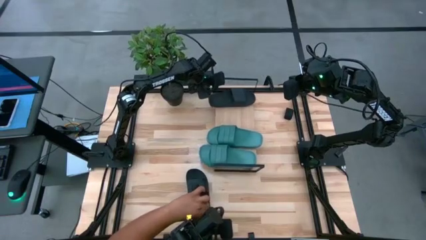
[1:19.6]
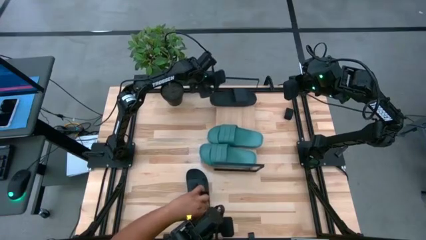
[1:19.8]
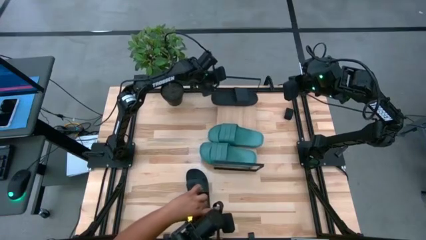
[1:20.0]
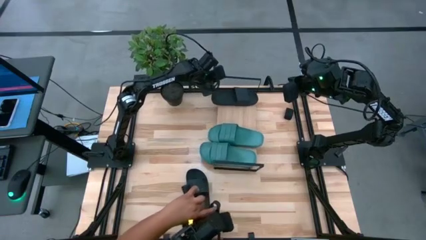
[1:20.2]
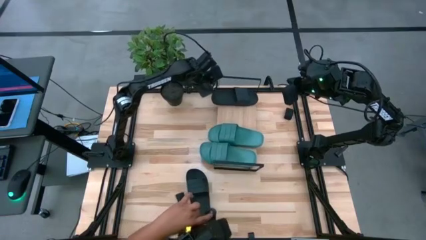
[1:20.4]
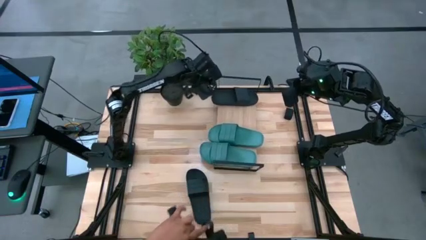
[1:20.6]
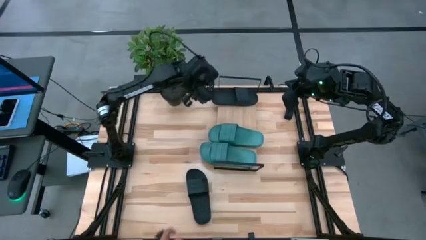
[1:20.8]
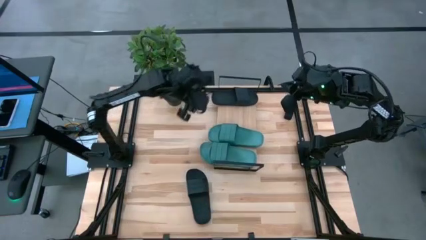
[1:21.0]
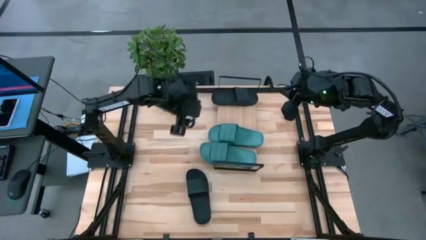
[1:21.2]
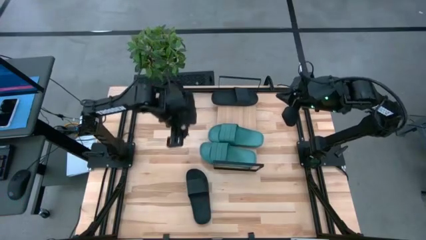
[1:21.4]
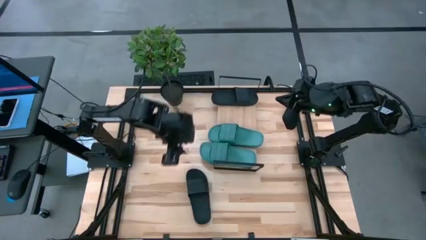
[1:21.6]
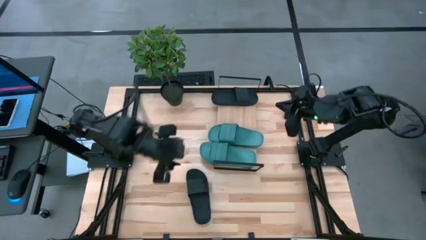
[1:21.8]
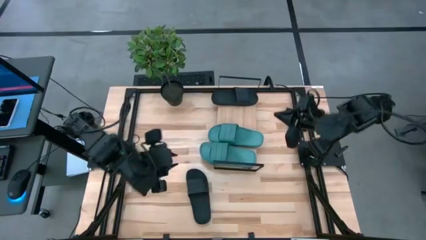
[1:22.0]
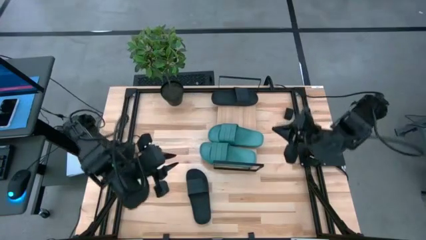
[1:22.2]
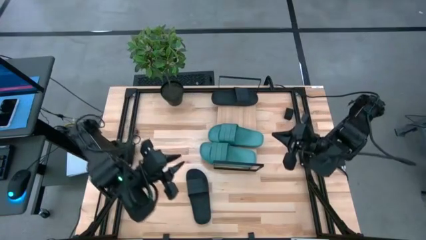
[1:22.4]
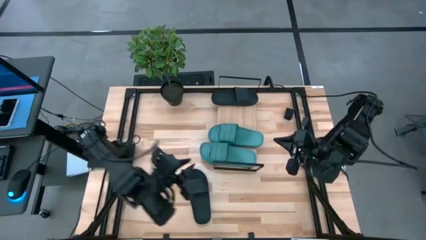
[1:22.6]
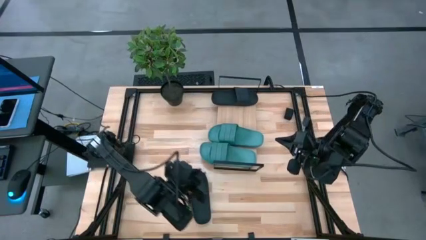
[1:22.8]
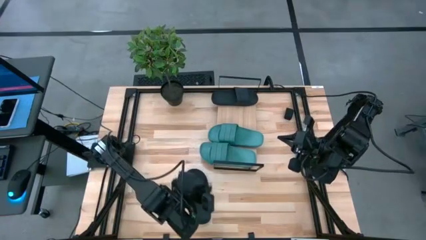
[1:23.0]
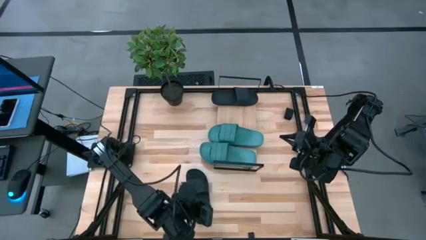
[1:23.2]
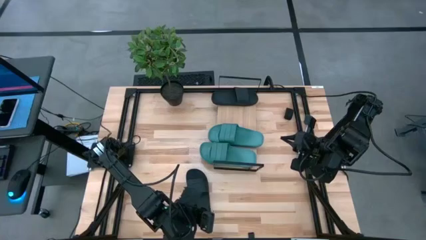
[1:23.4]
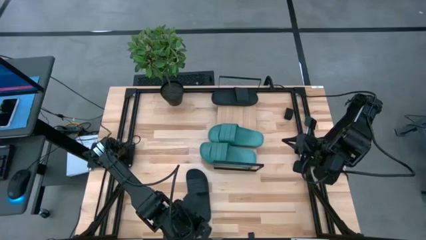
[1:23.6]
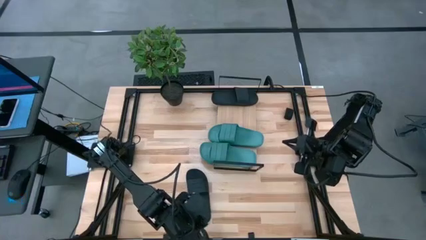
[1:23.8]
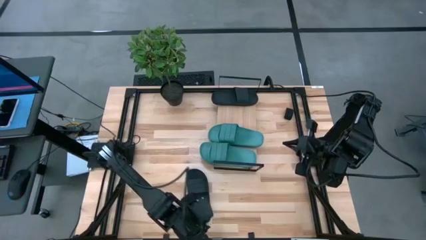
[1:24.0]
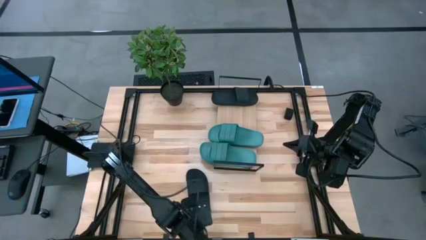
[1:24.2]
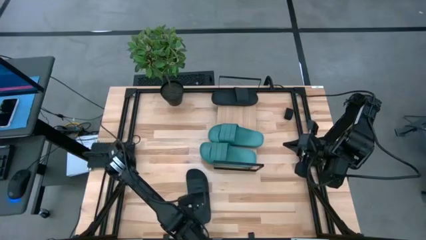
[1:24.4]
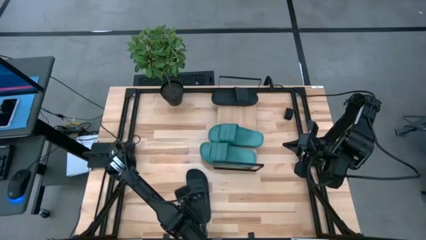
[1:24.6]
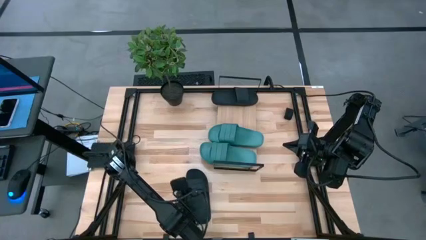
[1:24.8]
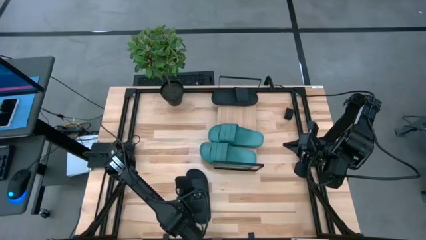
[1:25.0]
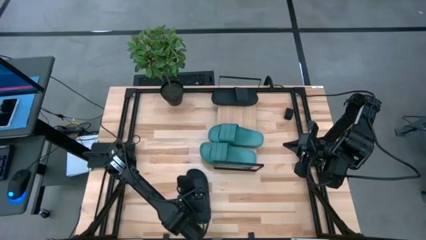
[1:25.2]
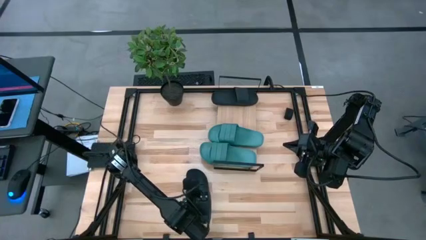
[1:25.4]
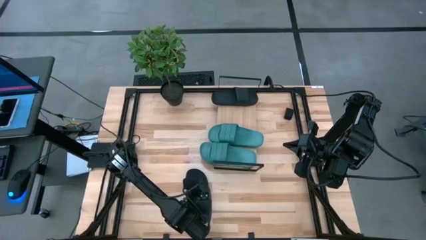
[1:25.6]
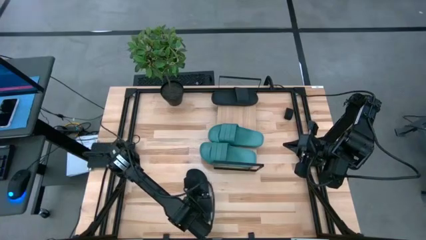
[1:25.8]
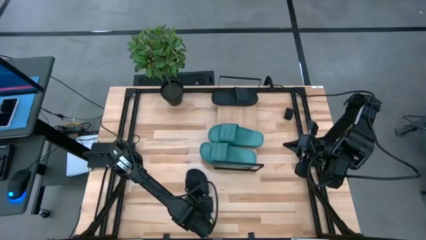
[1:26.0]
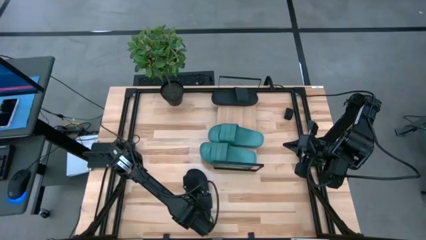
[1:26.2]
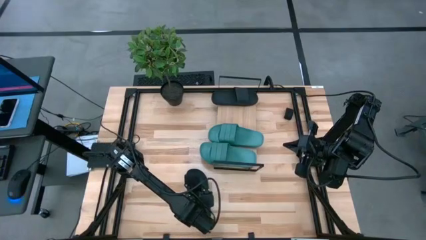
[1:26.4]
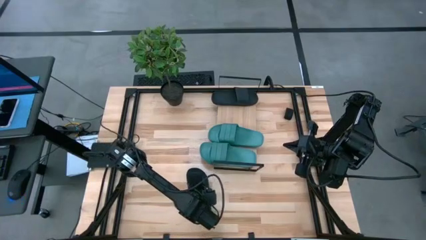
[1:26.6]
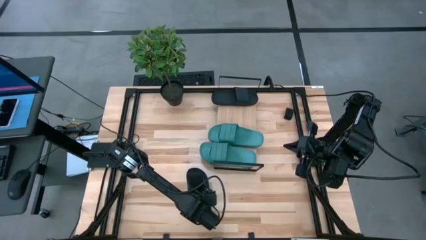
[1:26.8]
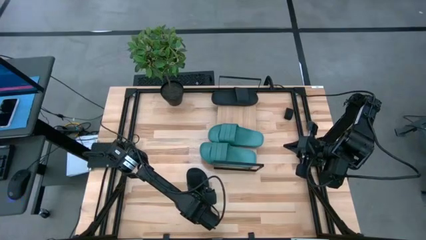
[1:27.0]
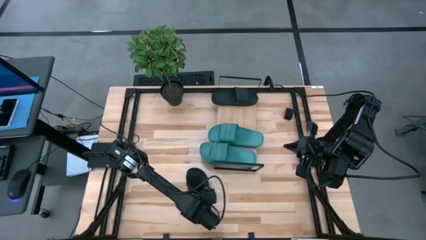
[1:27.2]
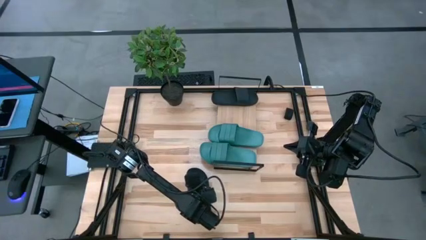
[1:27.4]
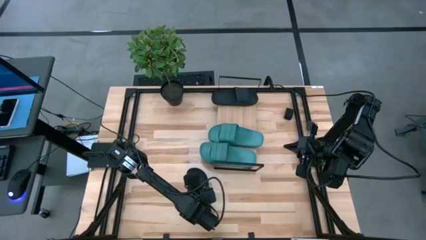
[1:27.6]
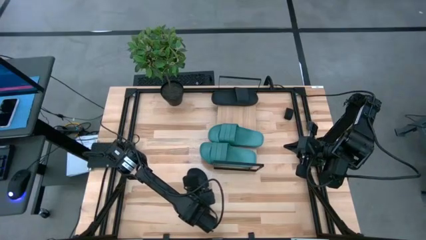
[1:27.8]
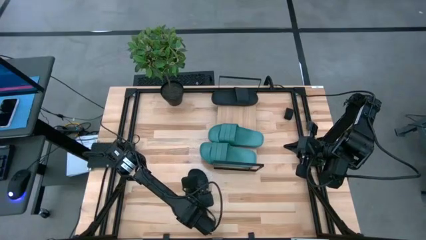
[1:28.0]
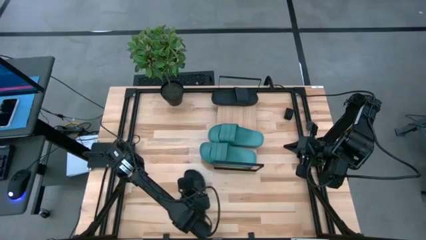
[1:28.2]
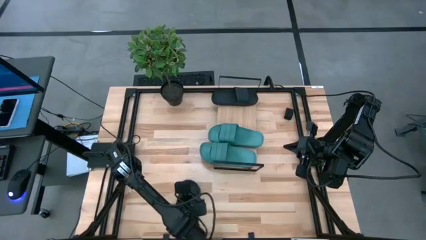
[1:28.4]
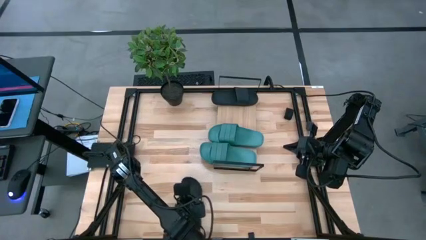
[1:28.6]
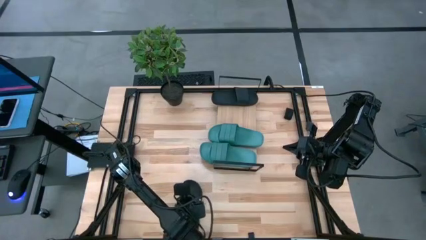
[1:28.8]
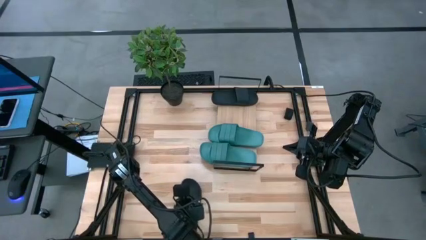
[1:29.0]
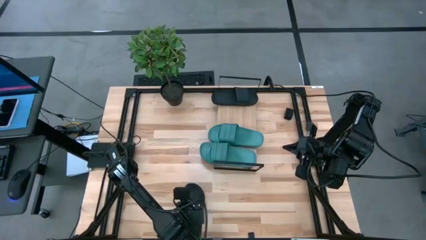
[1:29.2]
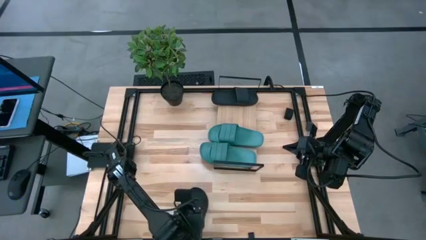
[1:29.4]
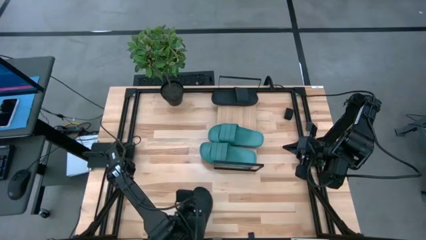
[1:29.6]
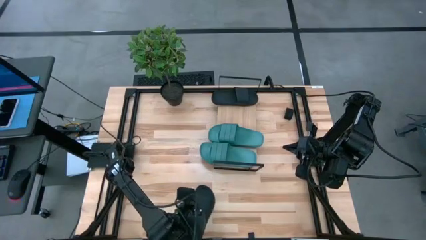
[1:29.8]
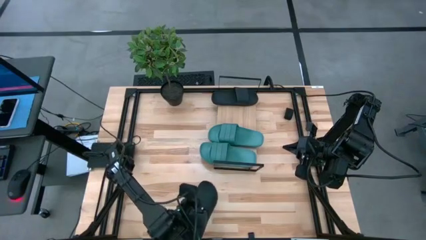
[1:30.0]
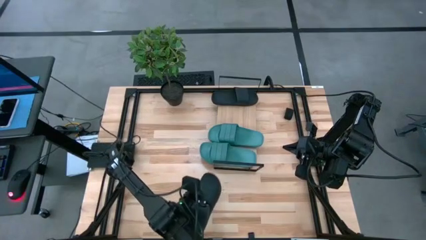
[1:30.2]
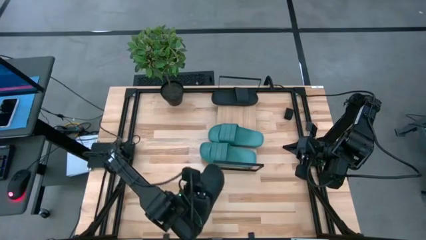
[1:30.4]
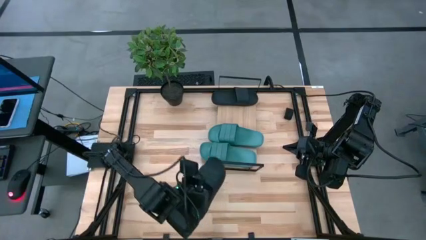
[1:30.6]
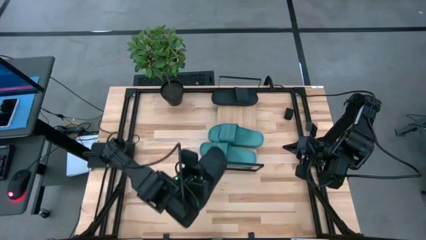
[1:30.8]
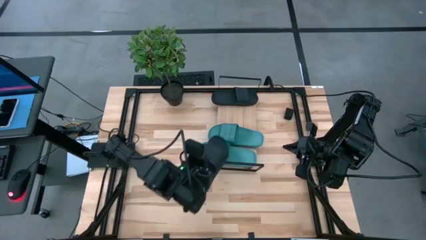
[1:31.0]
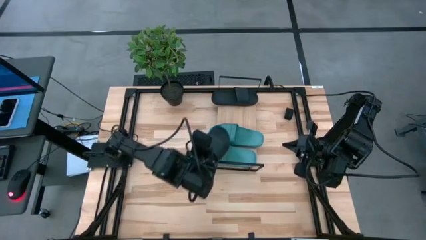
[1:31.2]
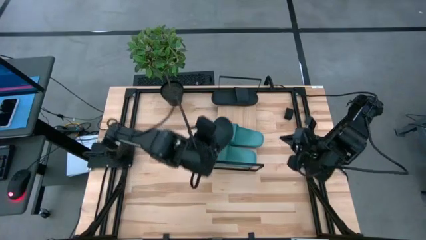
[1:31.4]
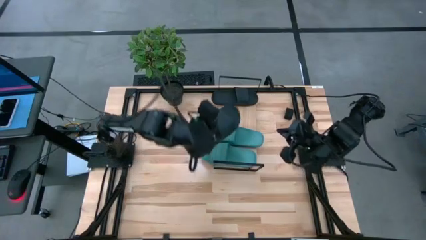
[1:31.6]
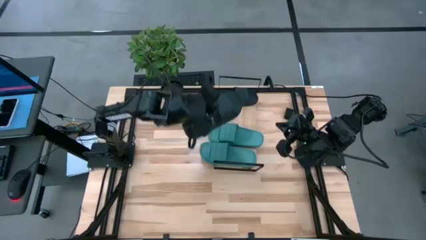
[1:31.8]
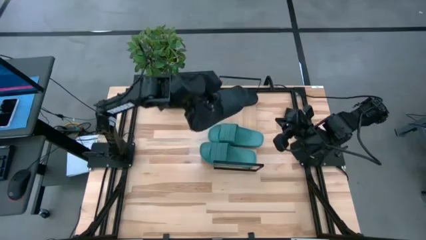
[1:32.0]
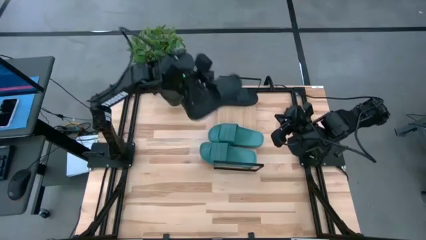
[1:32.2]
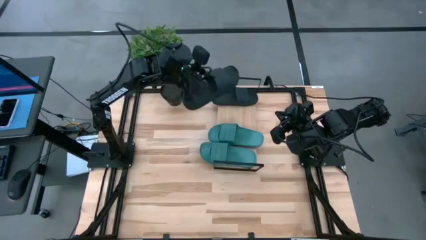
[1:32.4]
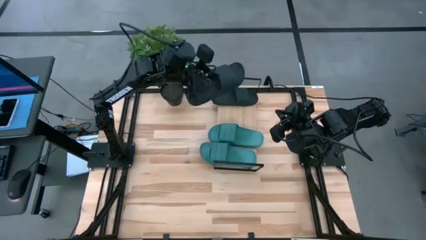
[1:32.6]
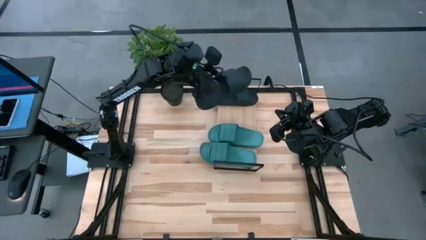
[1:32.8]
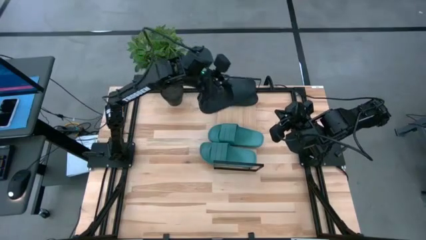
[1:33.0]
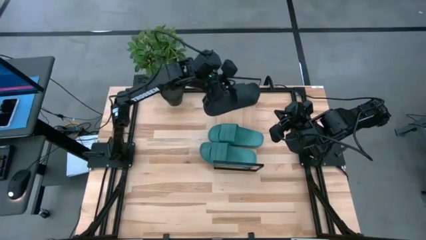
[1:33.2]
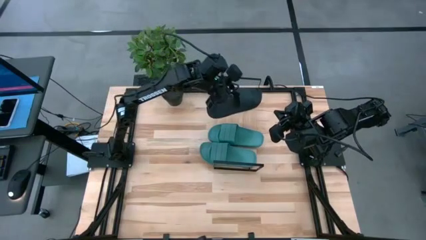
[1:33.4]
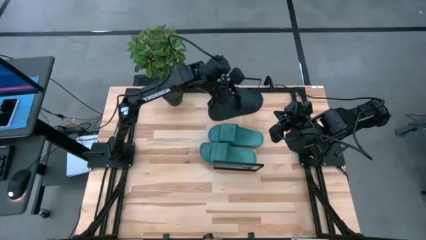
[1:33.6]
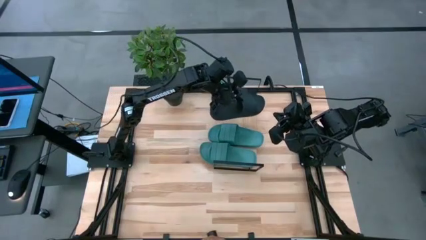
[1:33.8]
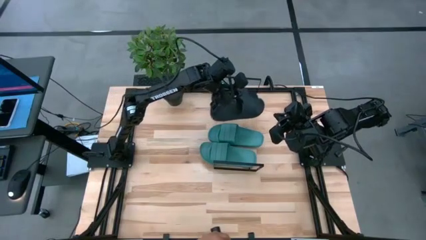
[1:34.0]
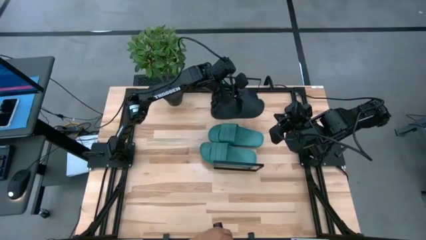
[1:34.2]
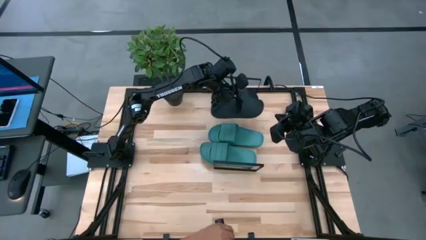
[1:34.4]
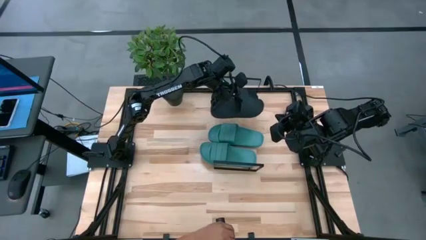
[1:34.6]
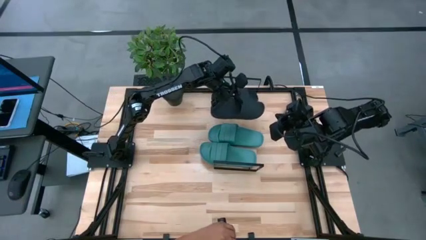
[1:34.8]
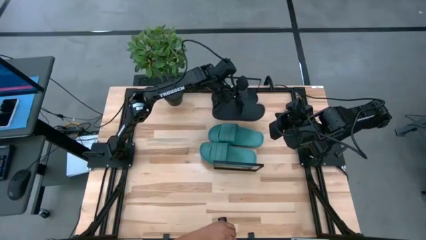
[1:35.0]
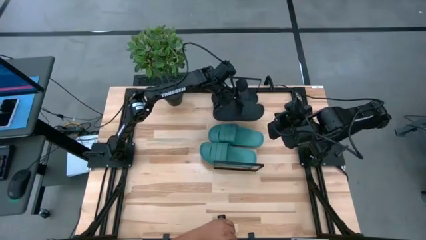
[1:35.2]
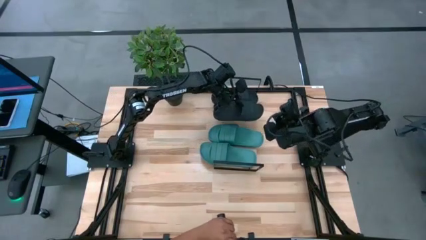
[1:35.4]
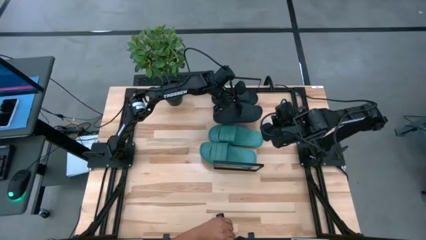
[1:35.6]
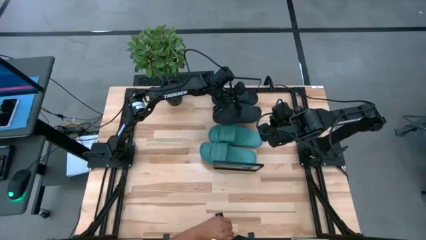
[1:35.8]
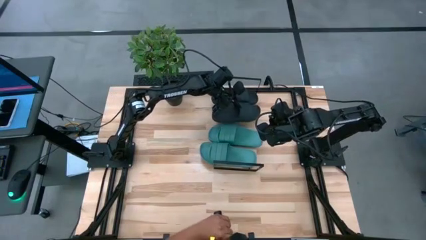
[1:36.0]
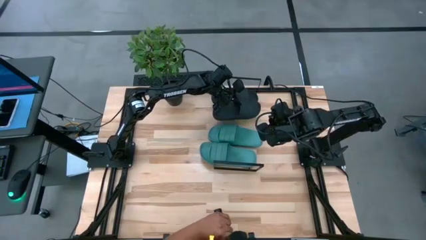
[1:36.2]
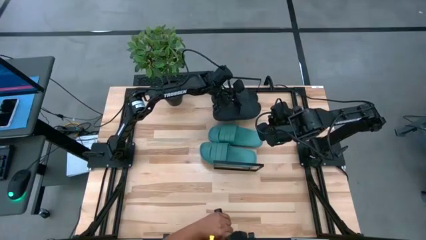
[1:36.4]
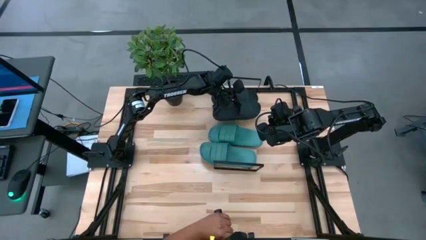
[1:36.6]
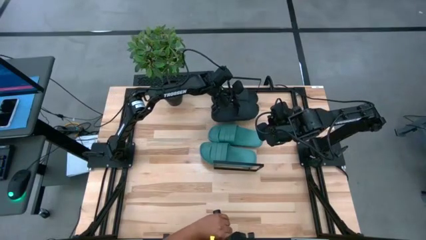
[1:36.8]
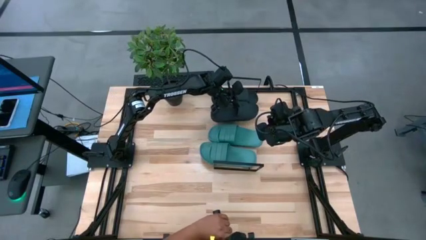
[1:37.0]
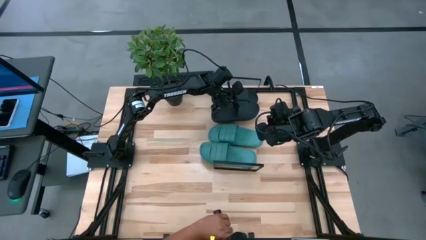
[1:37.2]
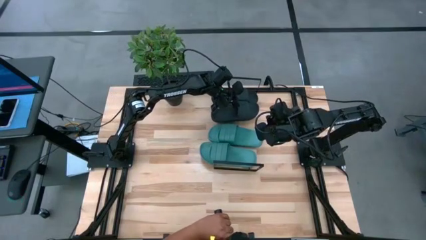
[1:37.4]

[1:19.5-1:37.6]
Task: Pick and place slides into the shelf
Put the black slide on the shelf
